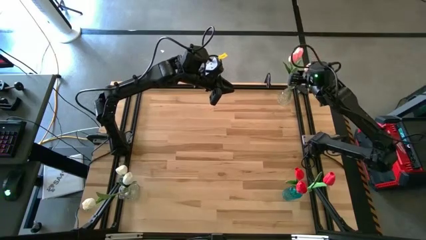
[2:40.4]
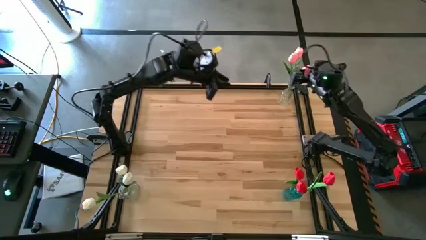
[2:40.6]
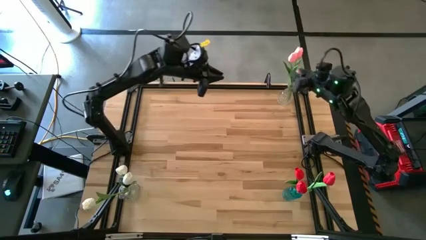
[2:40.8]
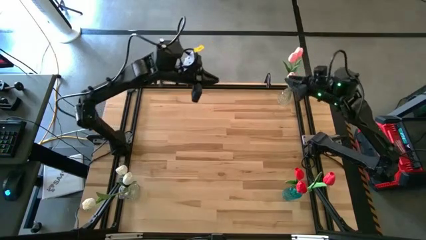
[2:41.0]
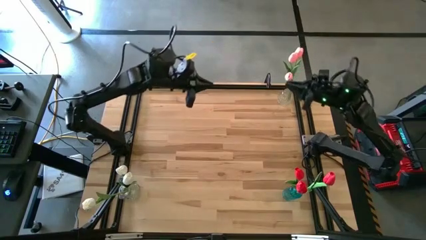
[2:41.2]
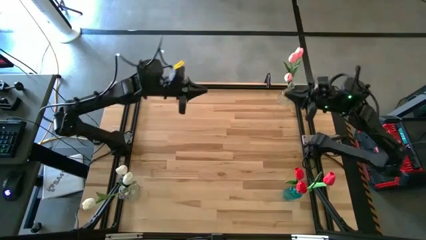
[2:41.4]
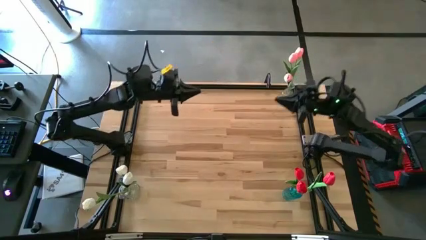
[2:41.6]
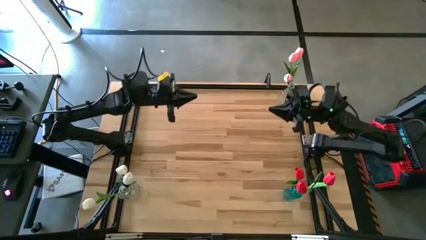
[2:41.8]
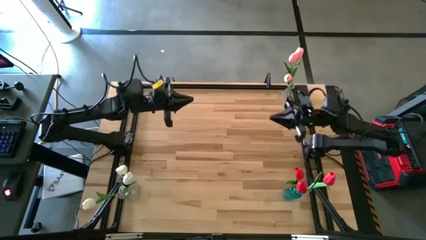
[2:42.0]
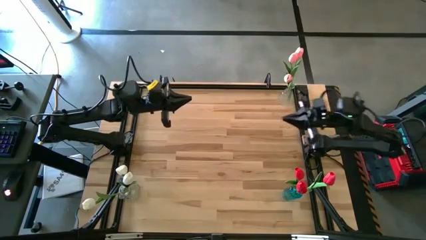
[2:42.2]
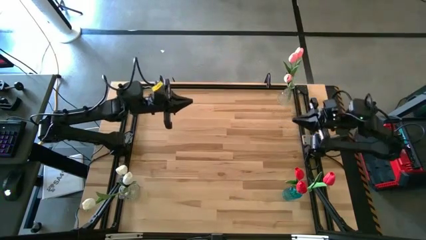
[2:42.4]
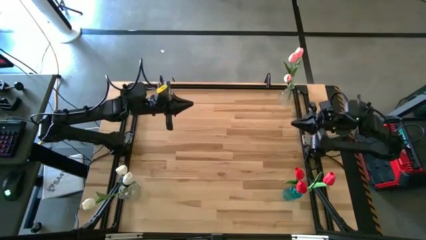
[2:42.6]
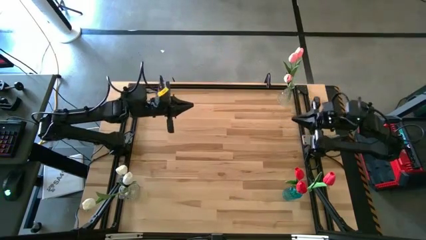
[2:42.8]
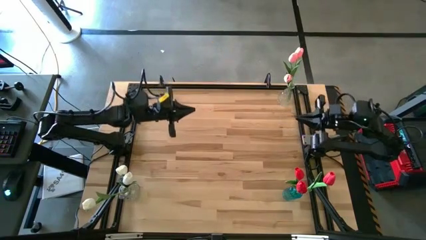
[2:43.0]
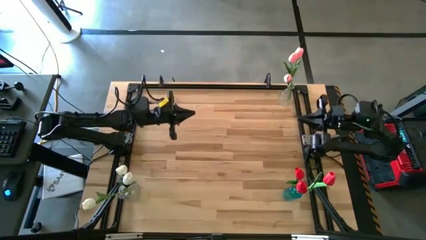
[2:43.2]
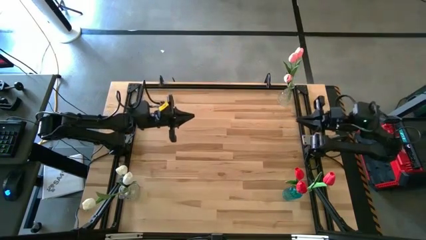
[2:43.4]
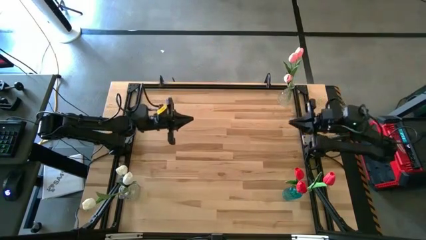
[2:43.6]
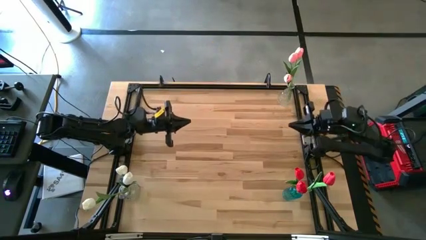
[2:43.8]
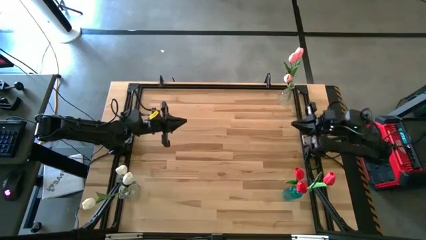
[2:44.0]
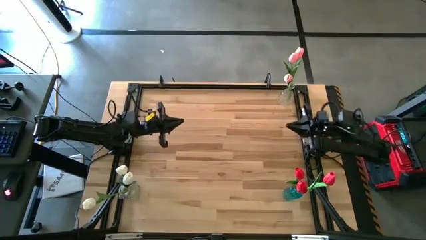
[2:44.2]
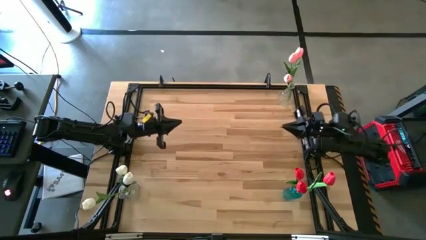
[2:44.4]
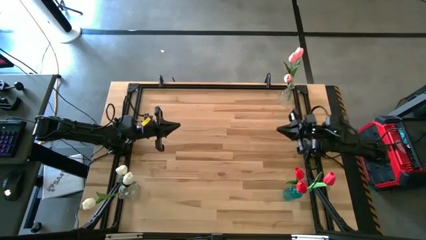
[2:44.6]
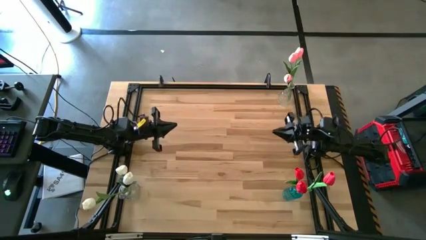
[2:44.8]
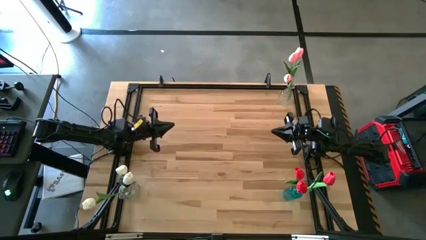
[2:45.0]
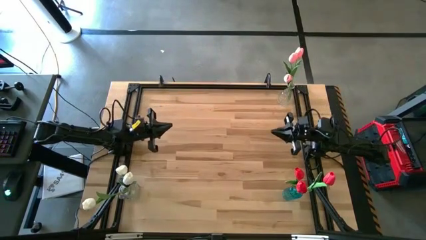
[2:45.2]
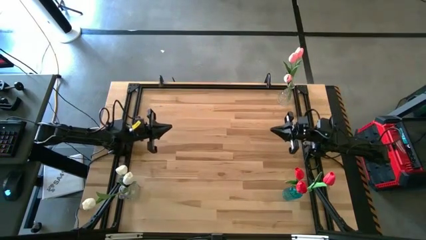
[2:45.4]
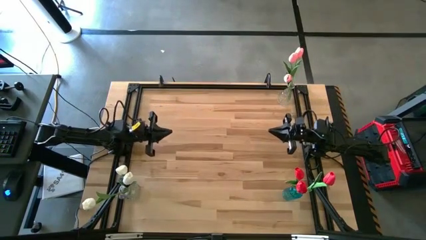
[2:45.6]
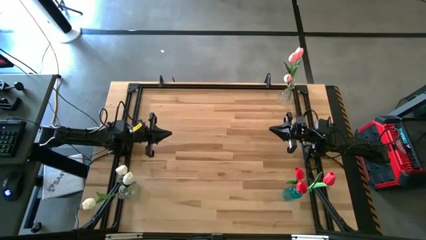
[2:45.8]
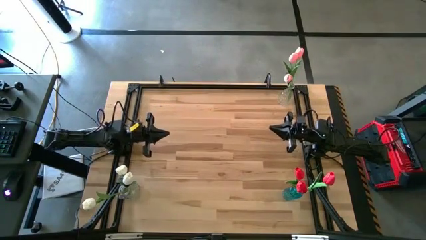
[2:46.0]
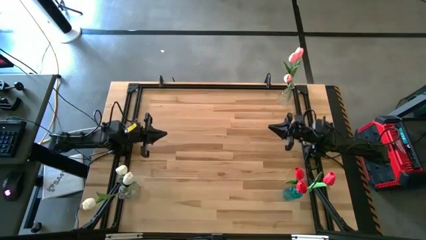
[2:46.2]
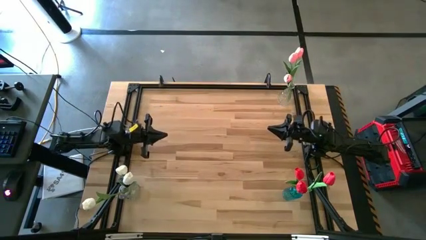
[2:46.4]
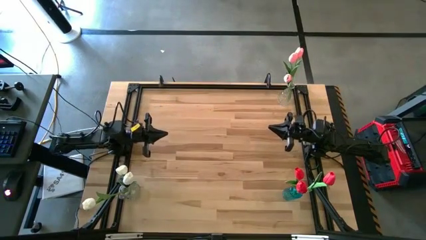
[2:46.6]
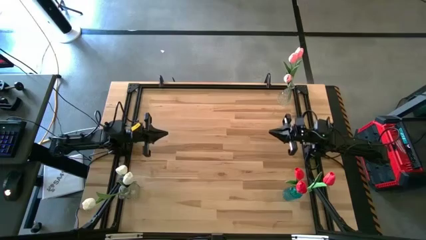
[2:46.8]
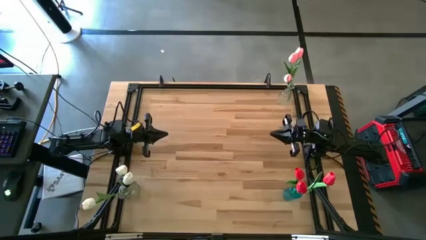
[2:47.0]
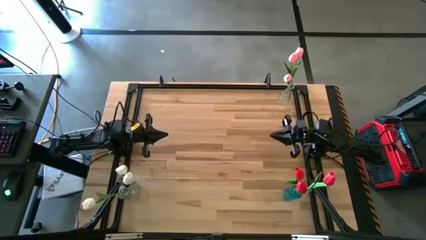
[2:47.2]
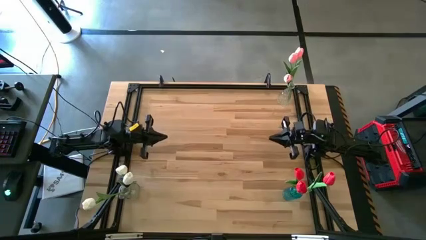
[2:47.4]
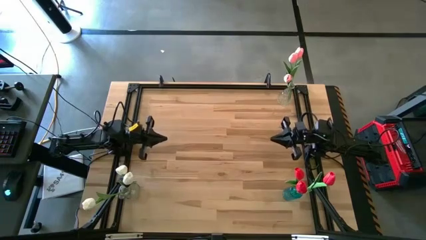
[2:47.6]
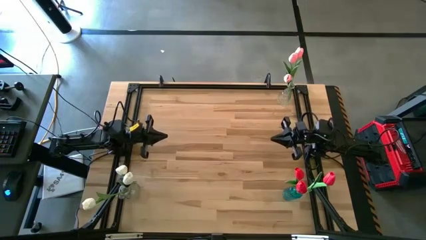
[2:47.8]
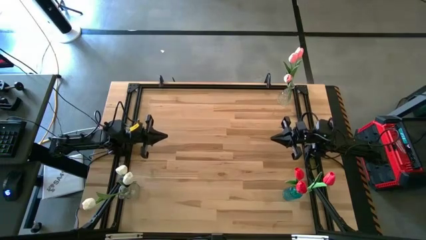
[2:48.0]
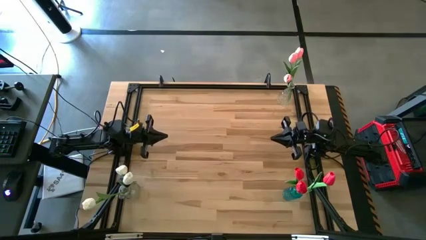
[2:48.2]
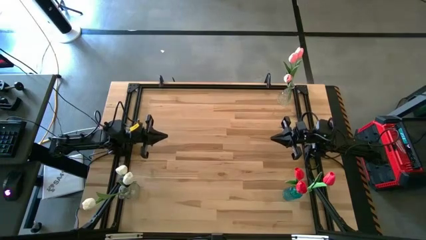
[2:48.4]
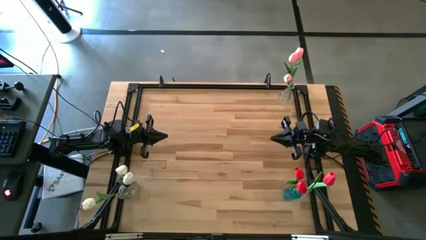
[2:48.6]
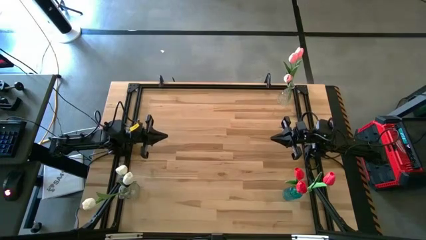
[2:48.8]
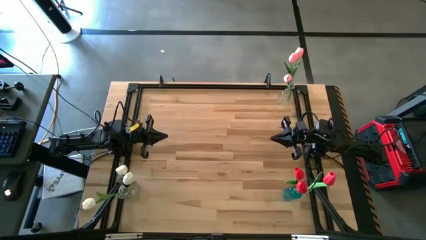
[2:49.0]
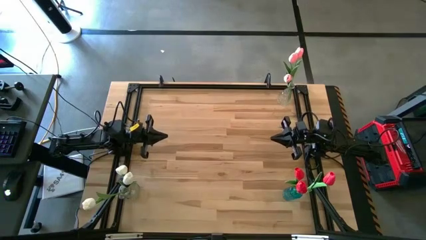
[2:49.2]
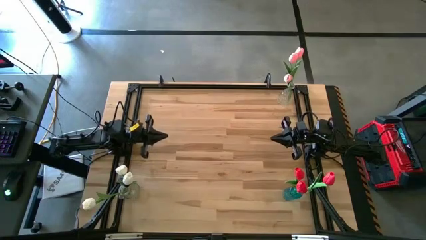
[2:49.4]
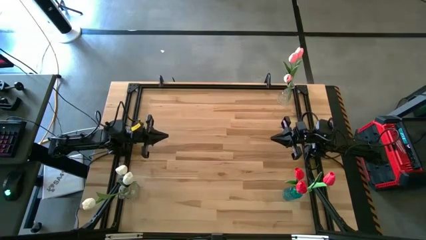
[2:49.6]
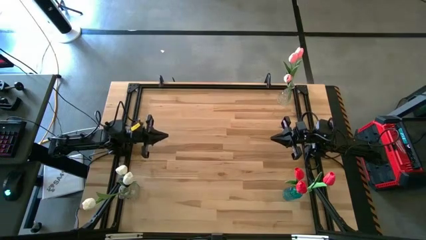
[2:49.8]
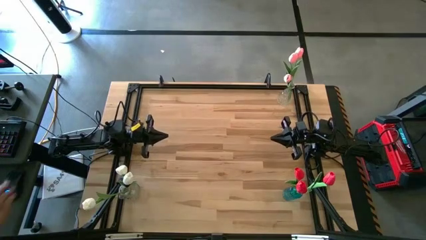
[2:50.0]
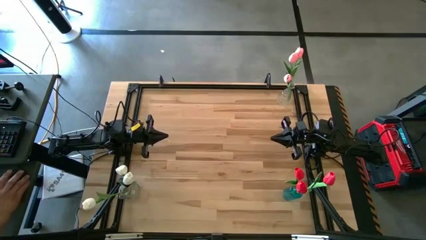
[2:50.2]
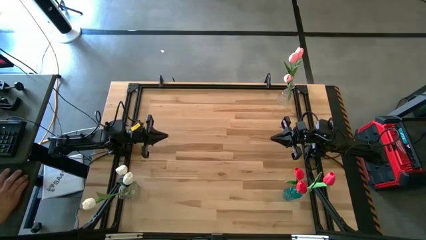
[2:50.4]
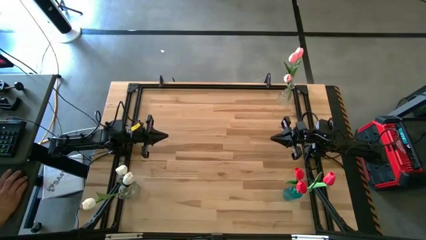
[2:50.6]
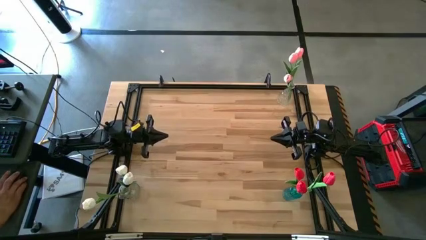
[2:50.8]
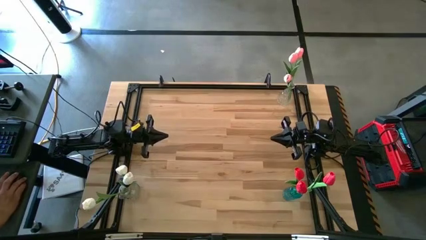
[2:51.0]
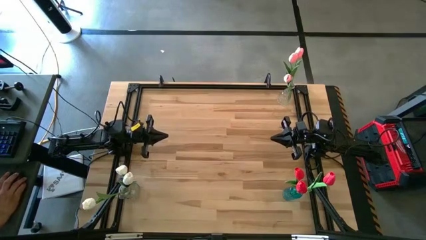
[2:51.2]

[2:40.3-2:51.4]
Task: Sort flowers into vase by color
Return to Home Position

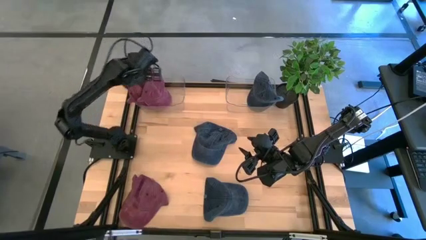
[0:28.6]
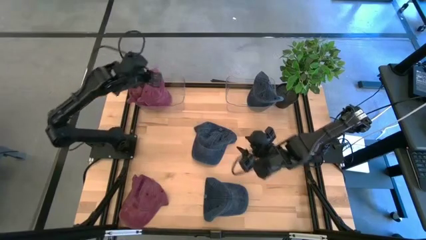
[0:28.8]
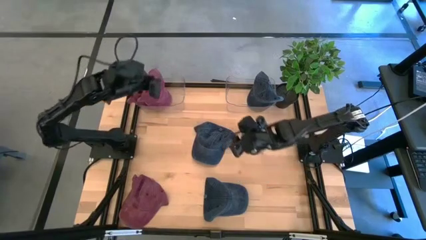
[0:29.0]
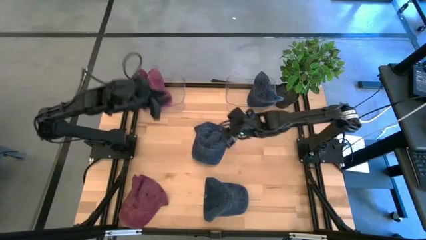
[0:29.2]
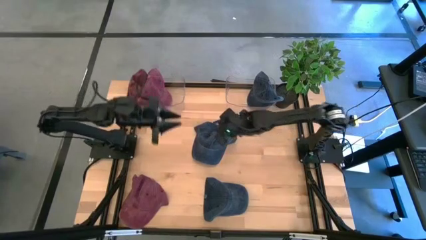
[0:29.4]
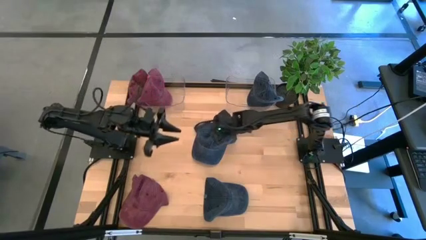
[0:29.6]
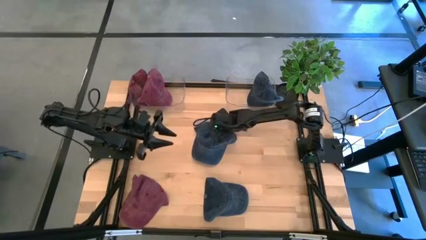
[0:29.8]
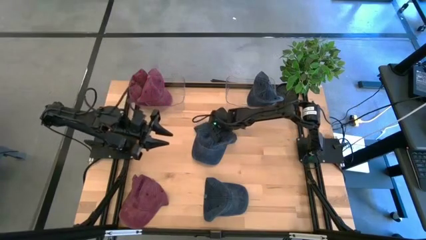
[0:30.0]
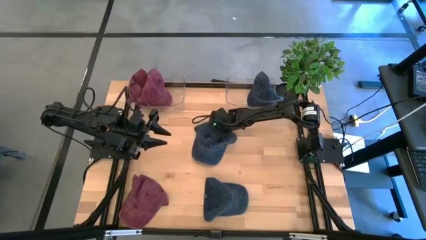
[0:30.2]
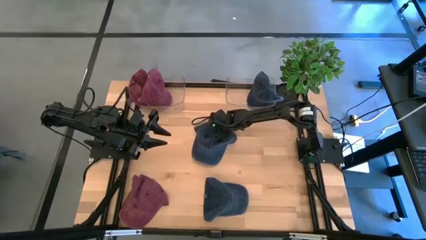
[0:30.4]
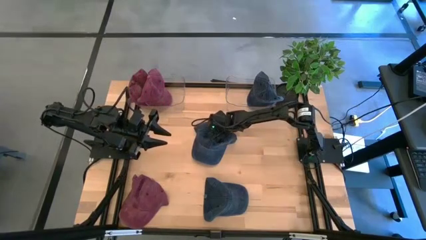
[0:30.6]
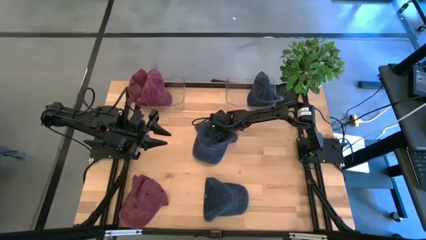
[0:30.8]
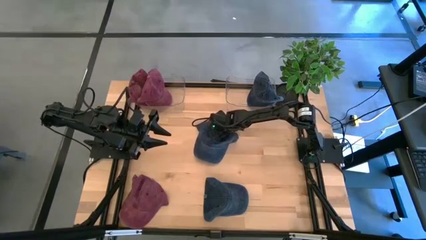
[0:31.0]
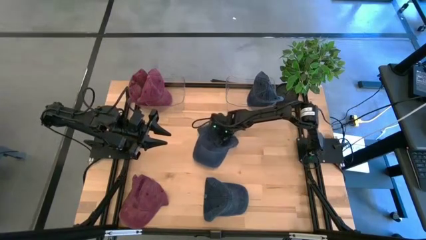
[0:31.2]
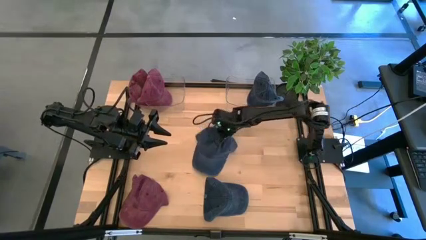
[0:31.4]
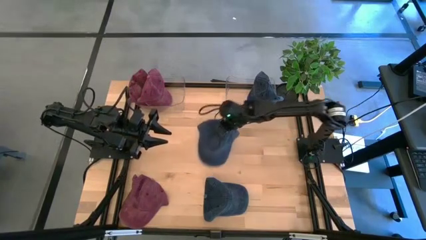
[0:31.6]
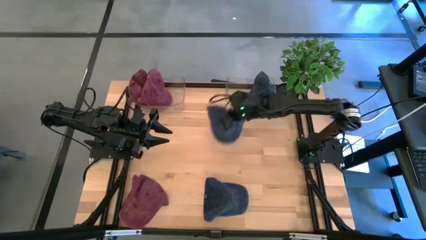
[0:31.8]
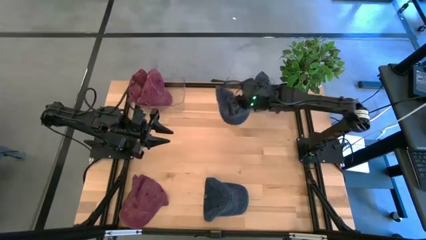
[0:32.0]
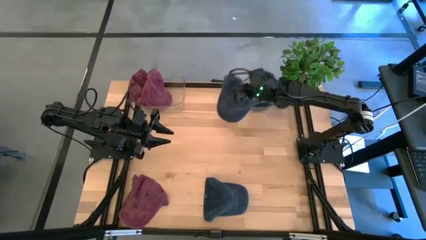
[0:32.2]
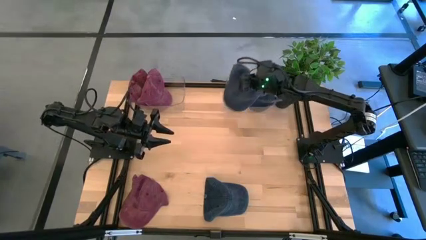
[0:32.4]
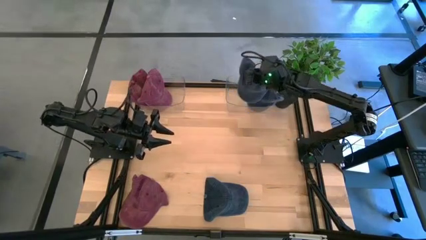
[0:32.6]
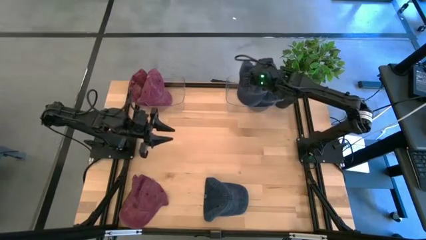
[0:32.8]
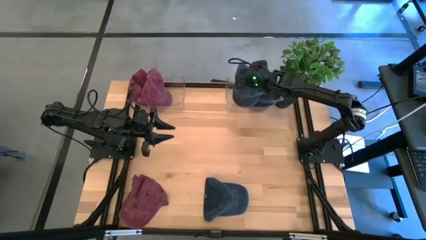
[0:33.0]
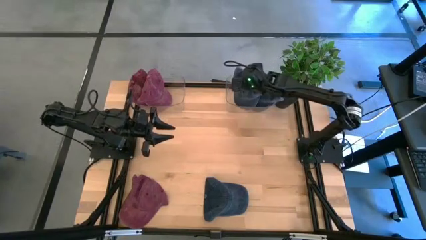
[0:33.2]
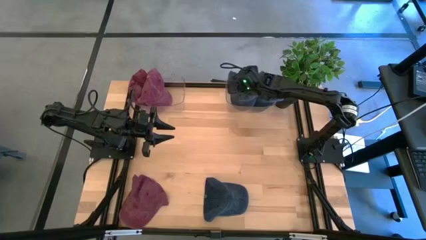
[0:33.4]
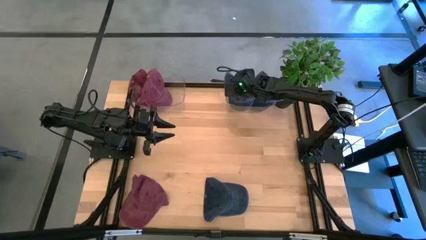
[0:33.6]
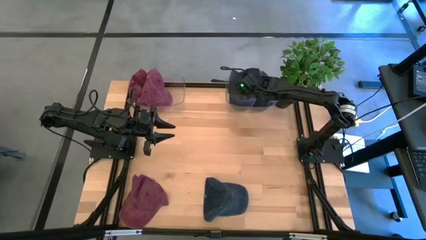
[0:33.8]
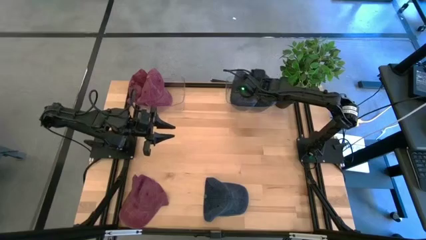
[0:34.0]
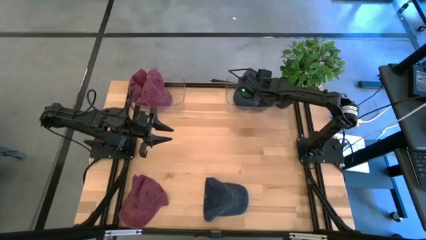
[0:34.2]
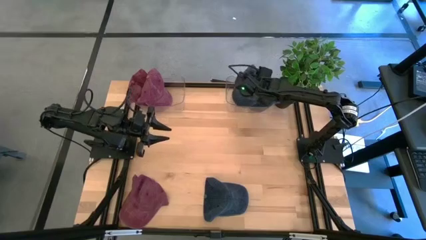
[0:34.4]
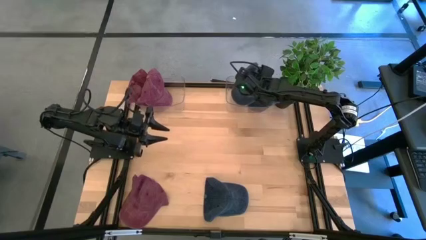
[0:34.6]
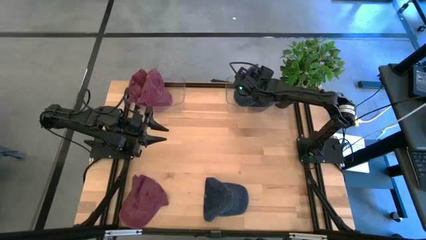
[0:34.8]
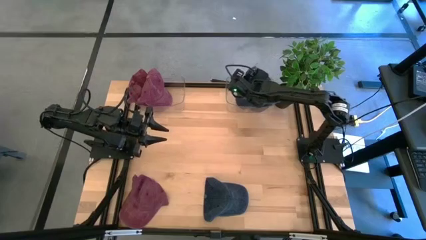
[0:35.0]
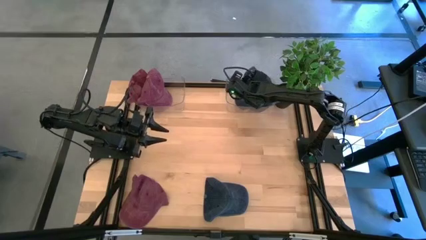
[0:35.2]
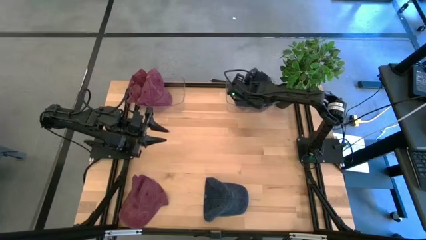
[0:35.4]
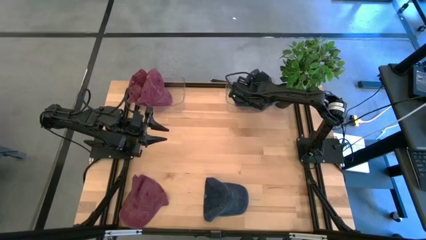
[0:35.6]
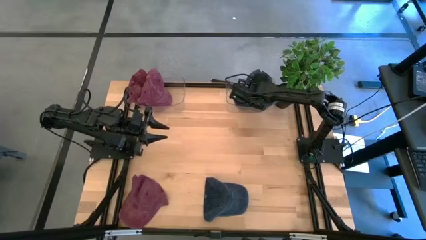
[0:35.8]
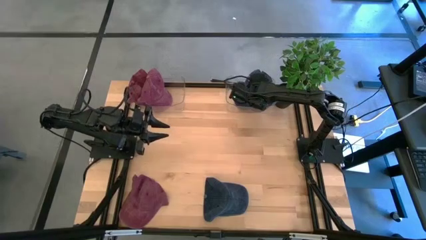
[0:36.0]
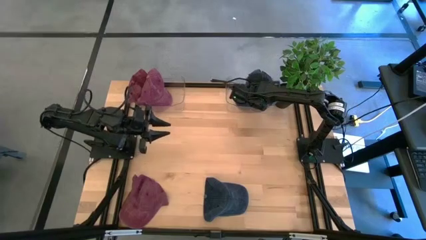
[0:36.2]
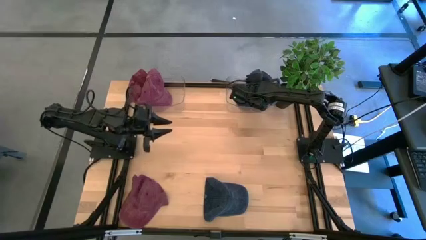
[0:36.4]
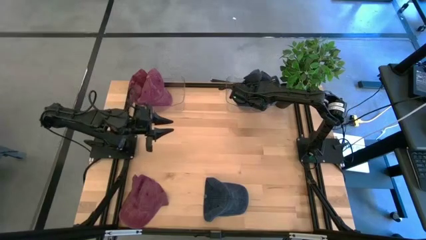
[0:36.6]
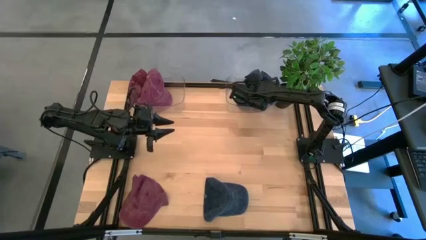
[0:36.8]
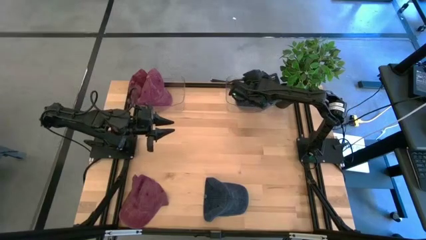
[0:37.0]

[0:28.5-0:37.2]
Task: Pick & Place hat
Put the top blue cap into the right transparent bin
